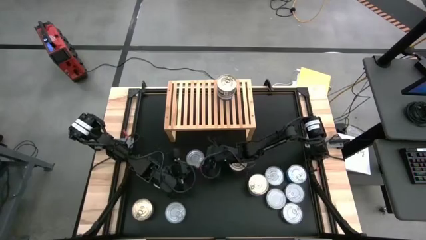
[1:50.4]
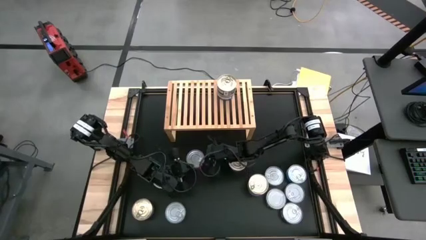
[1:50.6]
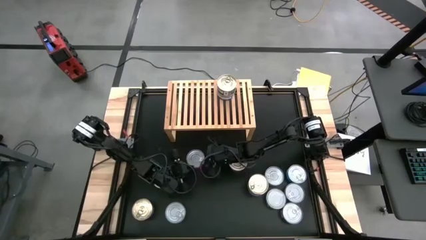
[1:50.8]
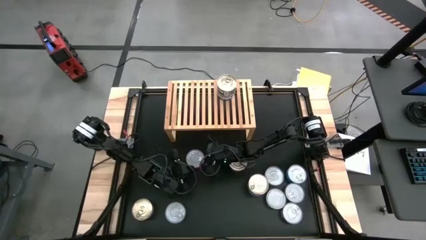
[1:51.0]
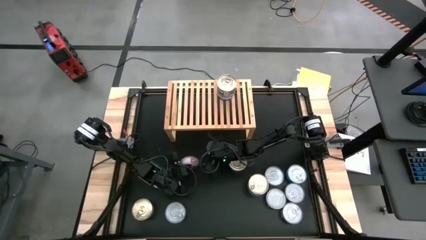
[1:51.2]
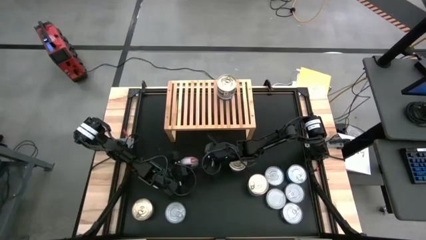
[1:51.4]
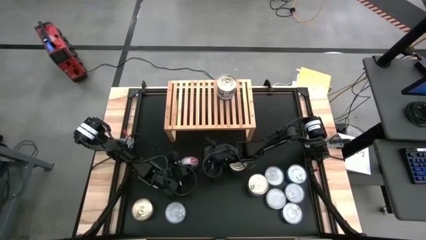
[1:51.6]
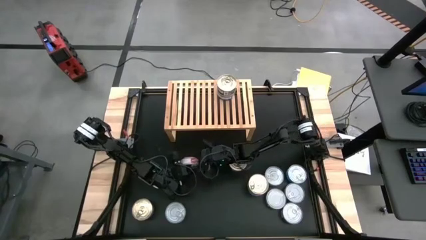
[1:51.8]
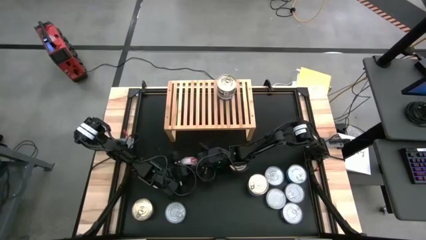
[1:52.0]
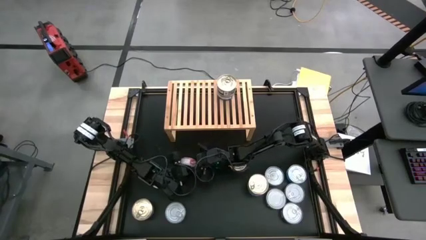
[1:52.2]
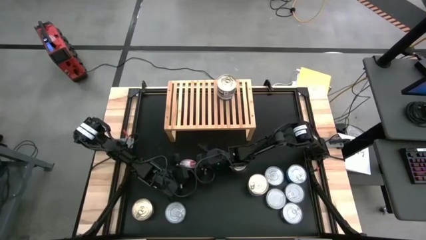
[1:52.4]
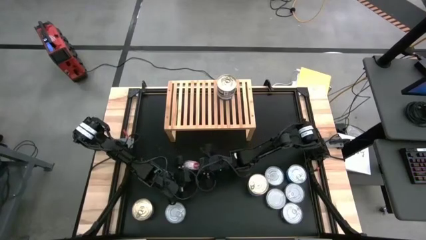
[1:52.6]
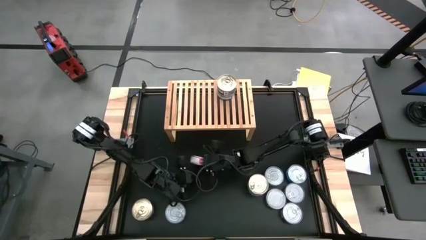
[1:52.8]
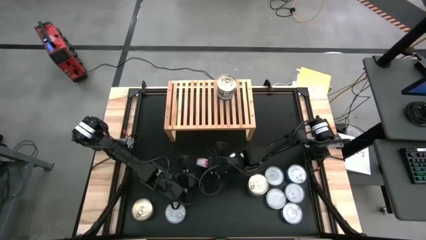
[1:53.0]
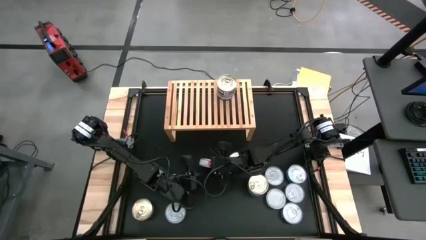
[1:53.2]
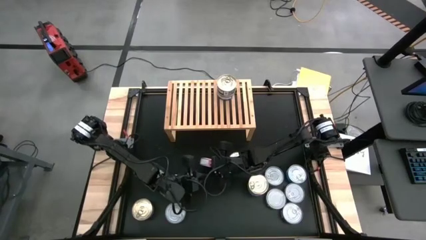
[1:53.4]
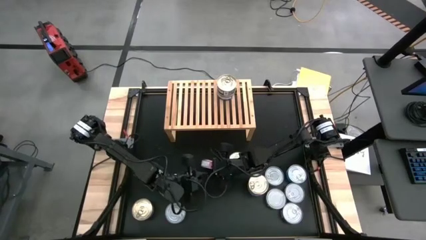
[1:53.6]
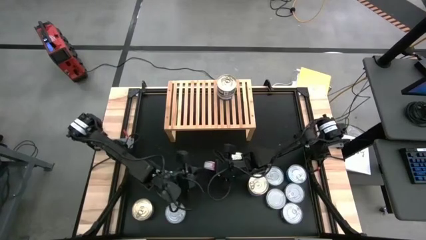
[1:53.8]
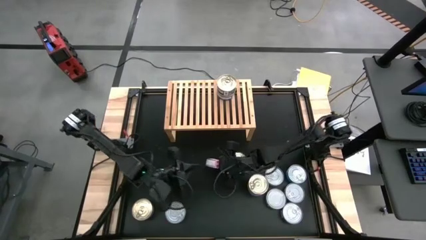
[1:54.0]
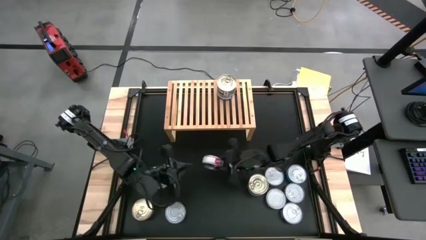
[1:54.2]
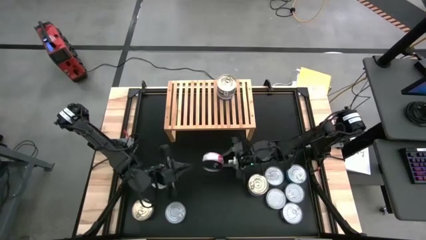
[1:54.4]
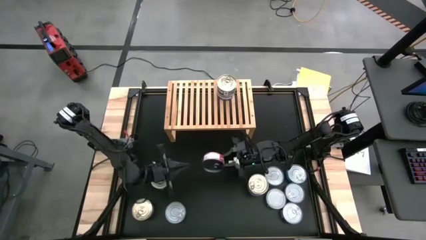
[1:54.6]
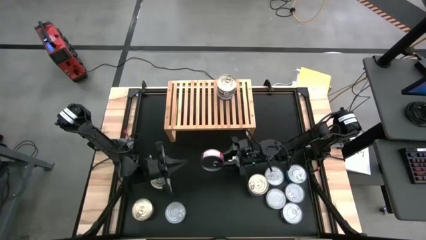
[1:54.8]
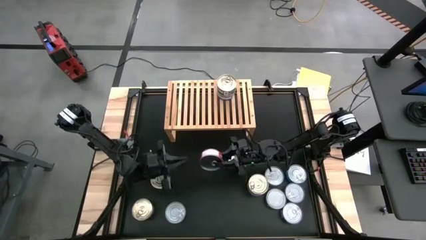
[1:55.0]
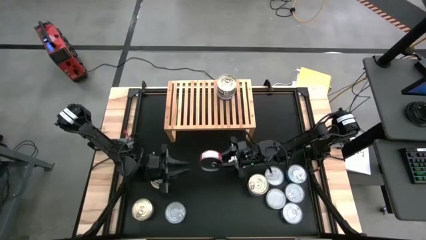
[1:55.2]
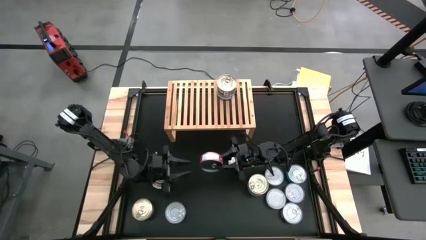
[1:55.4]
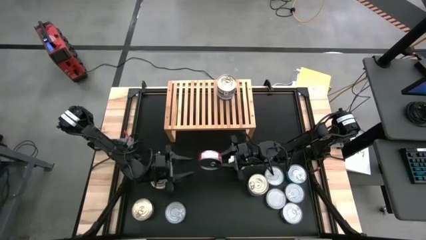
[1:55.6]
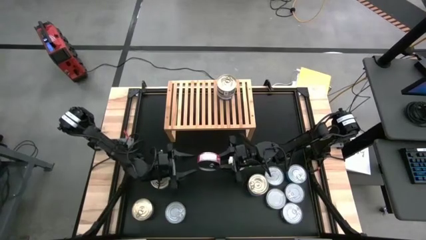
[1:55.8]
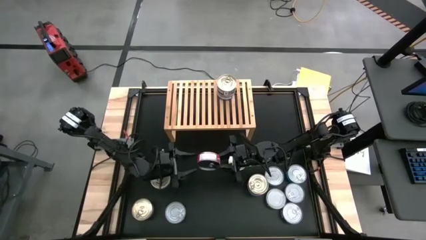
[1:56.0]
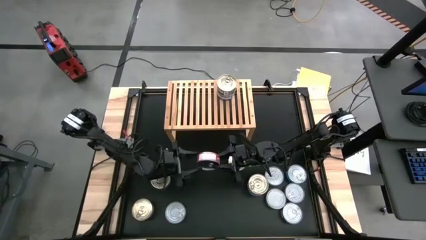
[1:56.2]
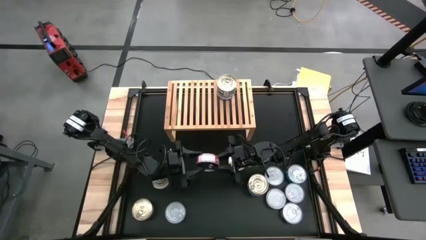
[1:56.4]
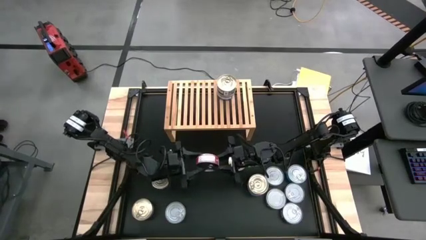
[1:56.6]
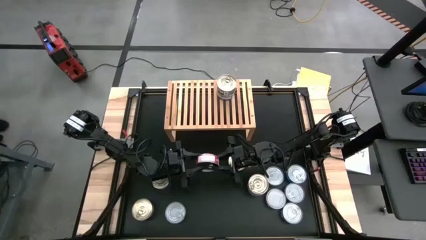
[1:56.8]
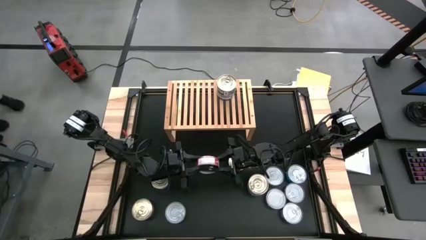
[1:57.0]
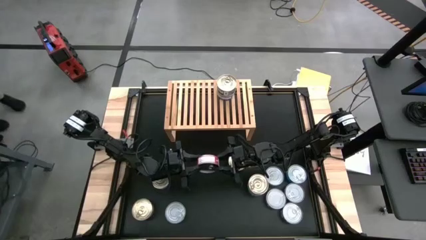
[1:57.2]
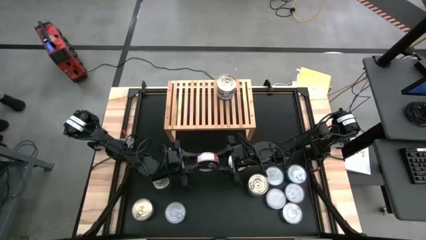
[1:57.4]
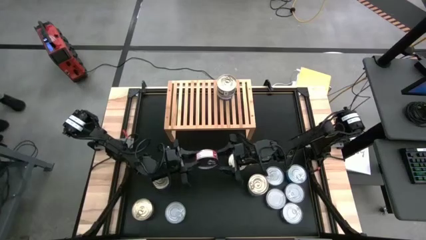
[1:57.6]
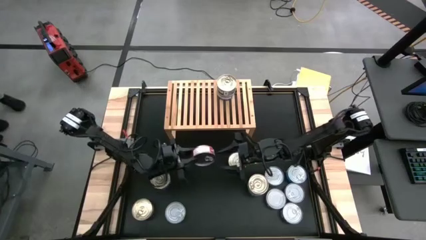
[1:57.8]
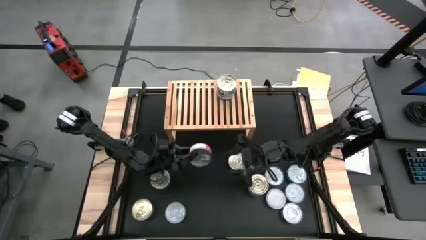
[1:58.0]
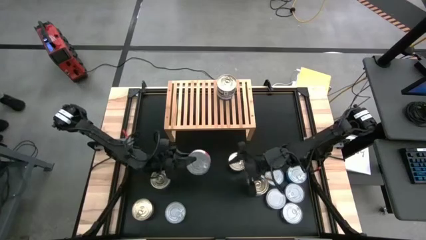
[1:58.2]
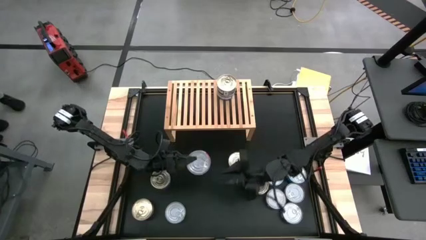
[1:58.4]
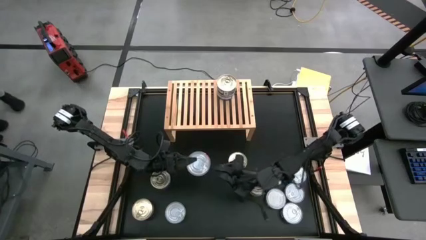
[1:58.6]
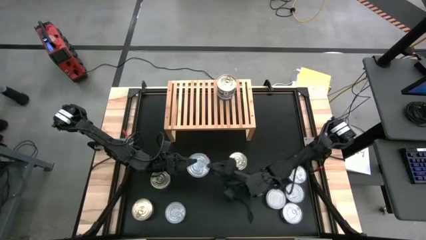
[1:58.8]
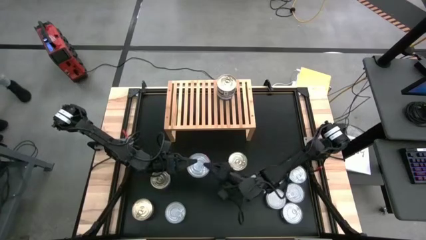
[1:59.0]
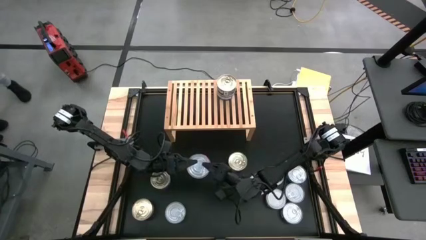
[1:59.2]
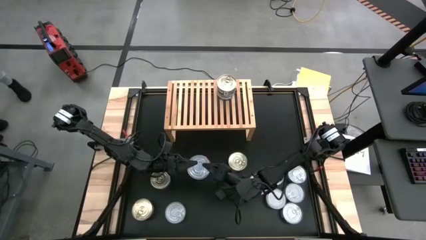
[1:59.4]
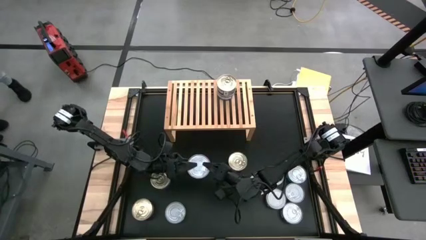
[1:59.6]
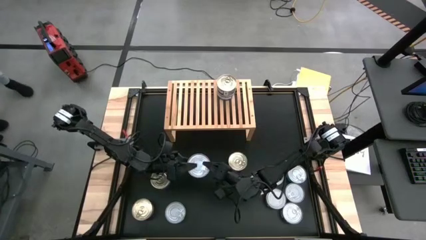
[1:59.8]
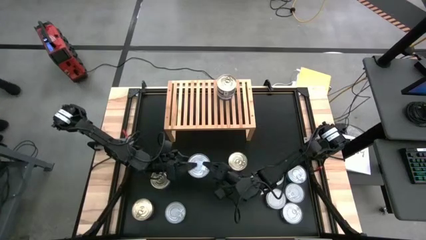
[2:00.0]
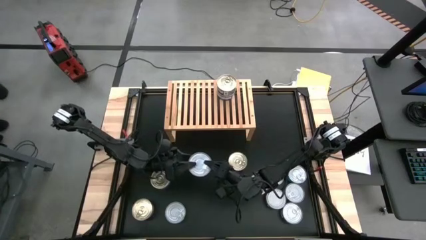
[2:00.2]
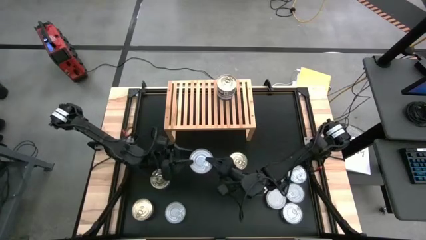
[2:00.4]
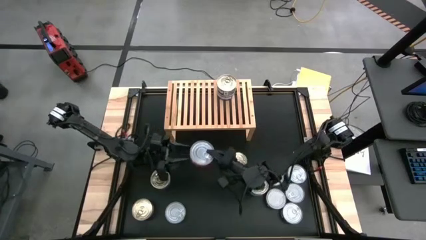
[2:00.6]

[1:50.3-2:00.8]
Task: Stack canned seafood by type on shelf
Put the red tuna can on the shelf

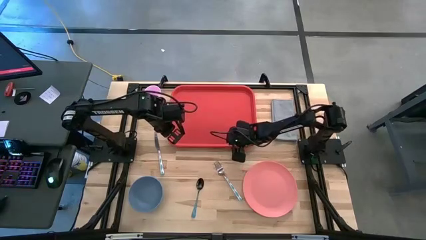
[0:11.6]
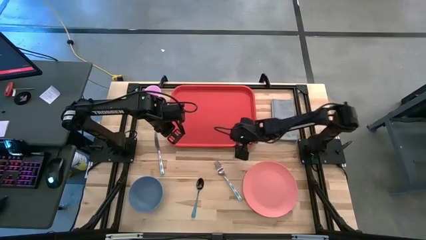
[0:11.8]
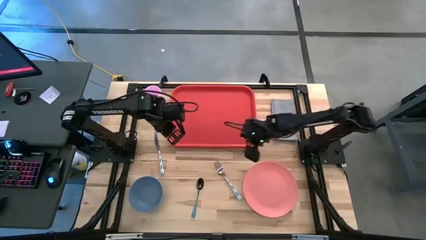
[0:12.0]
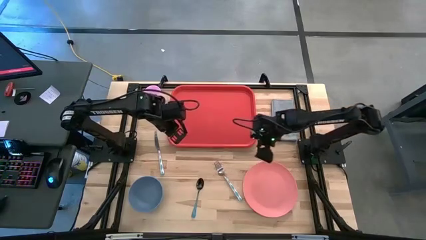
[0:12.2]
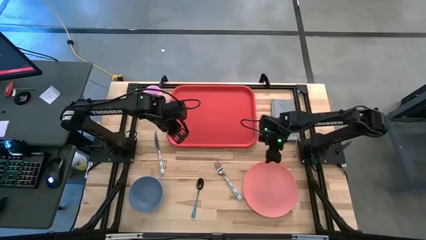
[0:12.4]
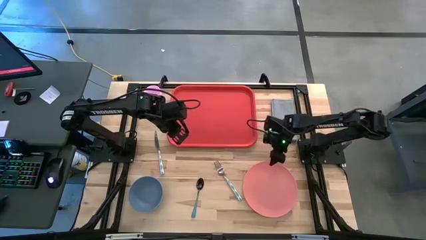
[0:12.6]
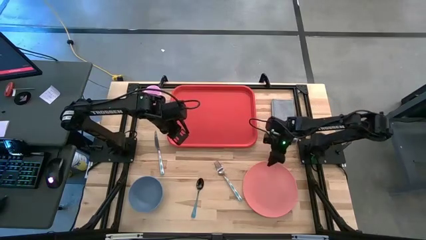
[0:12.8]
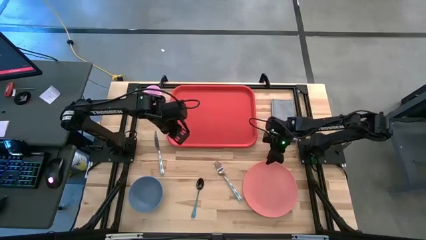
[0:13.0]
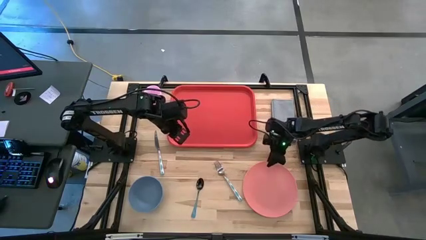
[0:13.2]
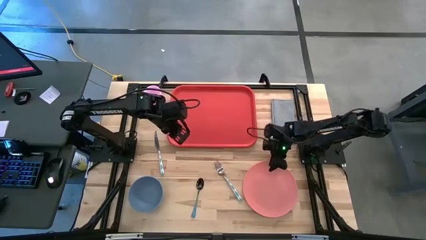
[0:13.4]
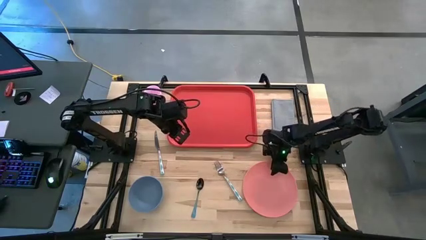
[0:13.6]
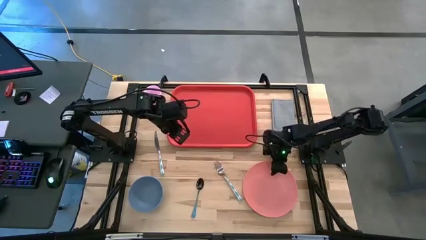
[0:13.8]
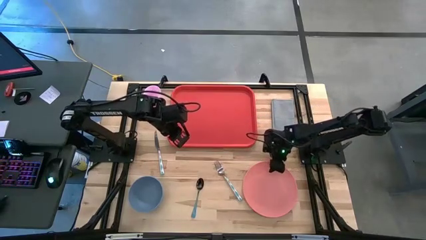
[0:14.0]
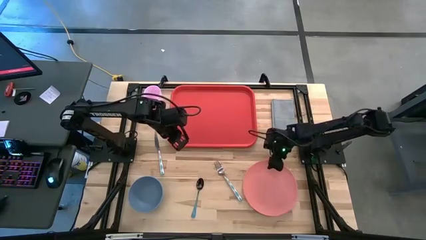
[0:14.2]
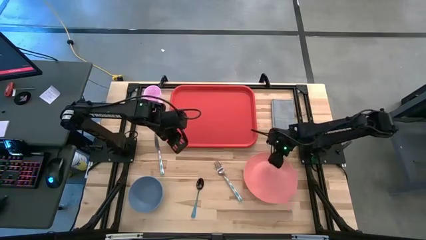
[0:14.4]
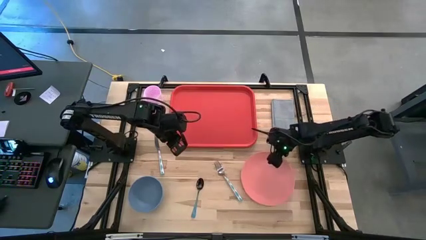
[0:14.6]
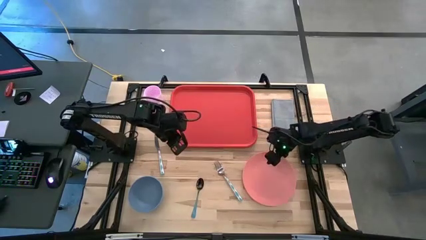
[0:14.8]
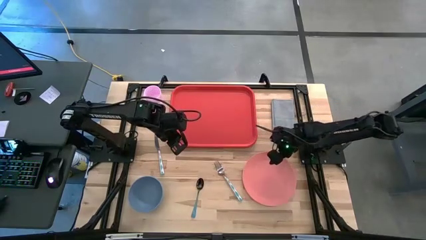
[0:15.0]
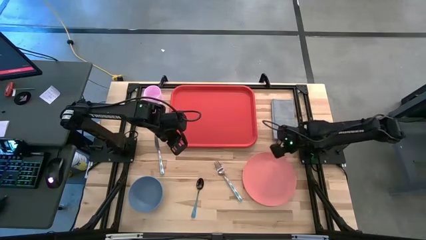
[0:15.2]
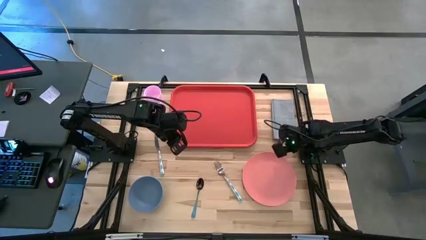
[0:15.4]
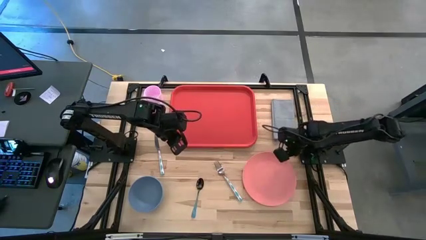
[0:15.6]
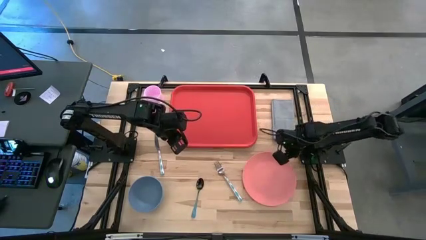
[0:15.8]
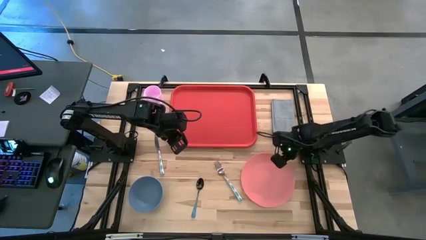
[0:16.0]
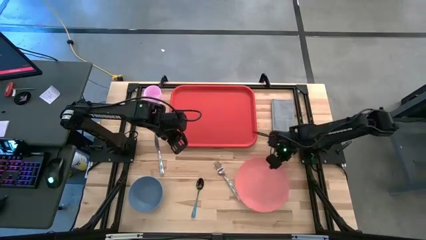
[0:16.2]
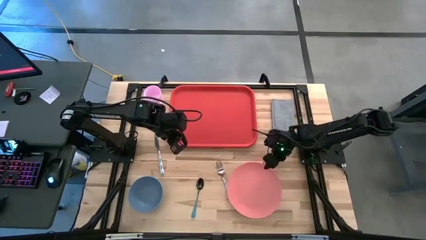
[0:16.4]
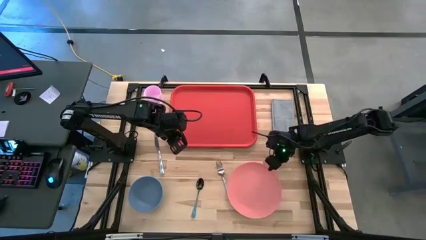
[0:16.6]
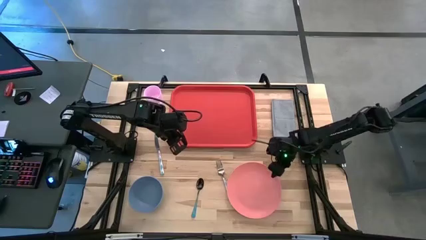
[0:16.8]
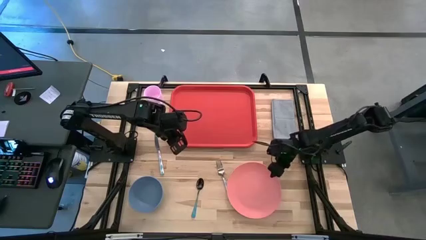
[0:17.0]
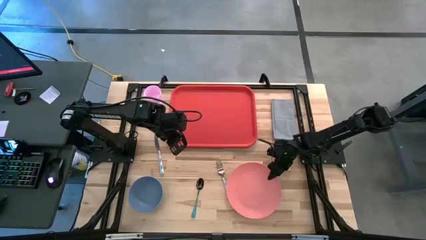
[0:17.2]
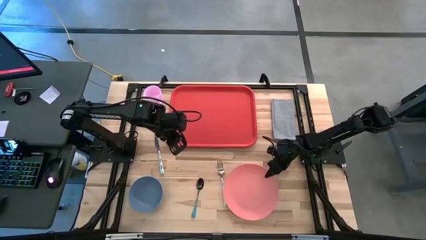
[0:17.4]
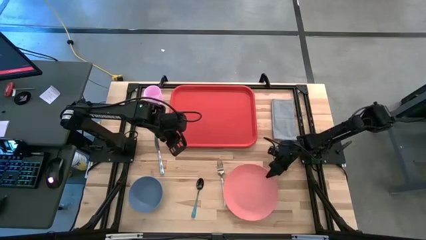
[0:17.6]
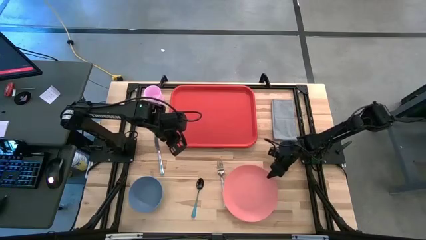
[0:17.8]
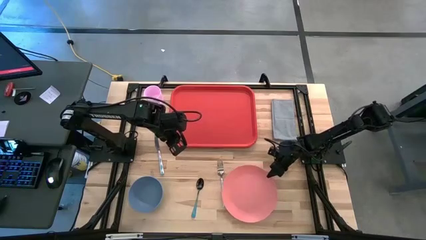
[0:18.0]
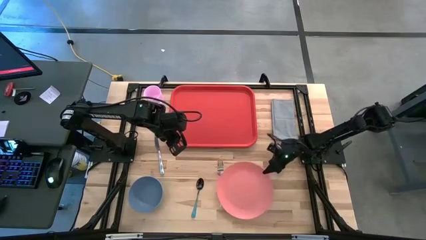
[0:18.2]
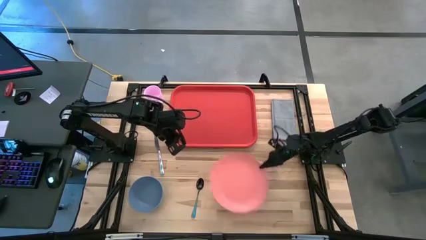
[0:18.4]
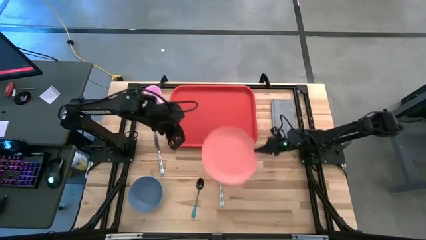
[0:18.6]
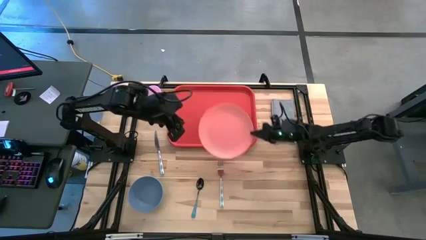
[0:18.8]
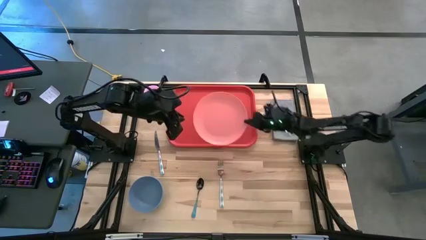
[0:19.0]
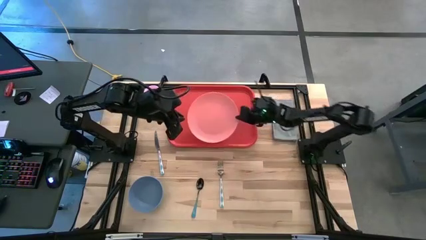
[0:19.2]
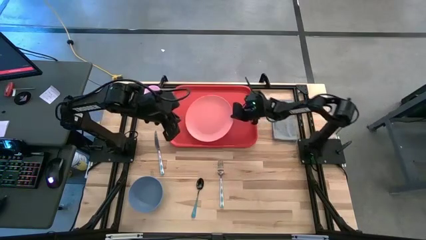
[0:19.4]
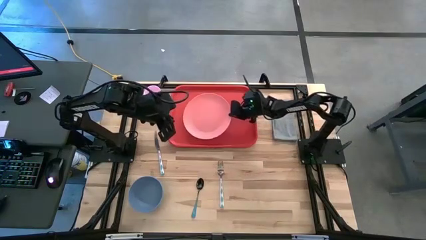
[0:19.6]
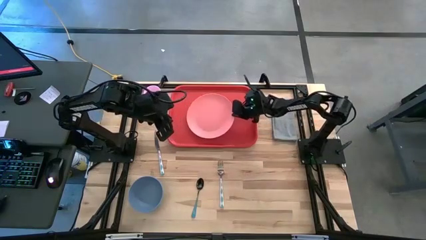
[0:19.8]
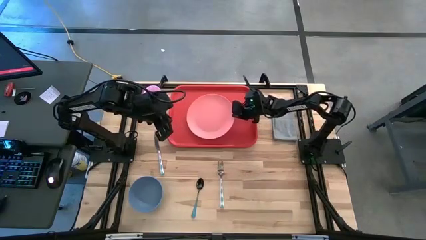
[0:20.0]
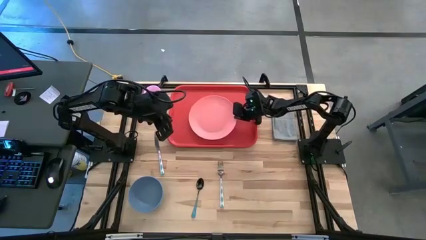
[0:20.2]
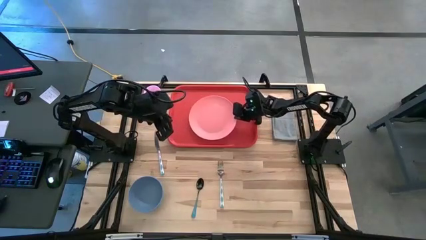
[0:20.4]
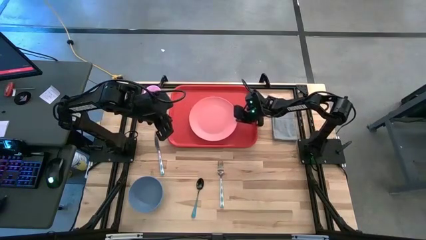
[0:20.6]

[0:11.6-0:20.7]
Task: Set up tray
Put the pink plate on top of the red serving tray
